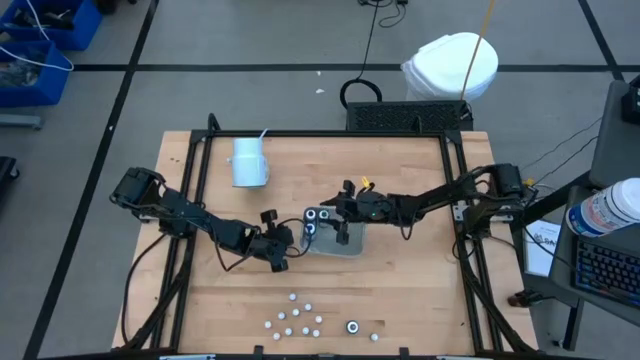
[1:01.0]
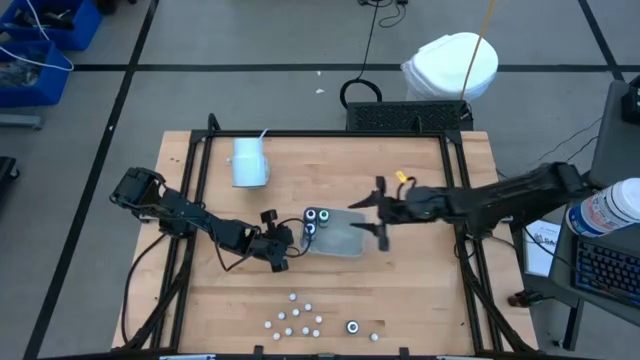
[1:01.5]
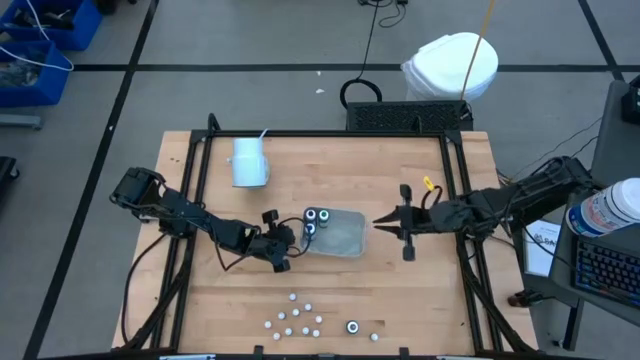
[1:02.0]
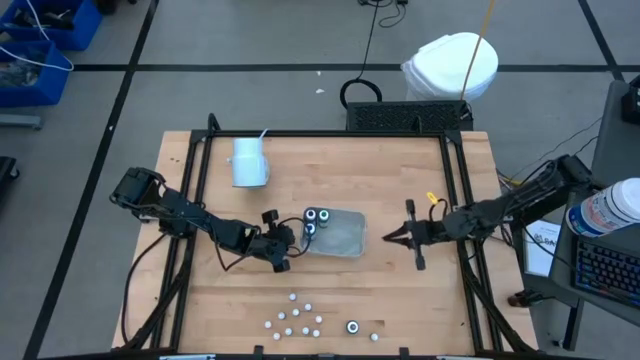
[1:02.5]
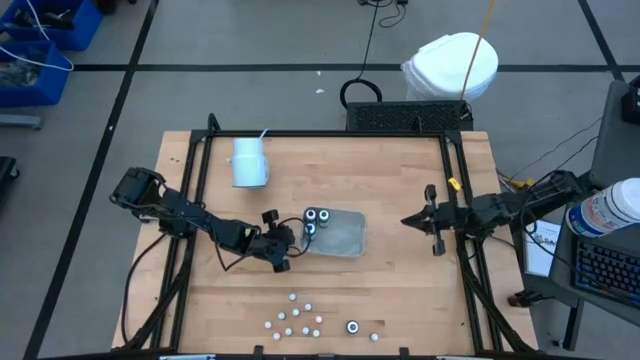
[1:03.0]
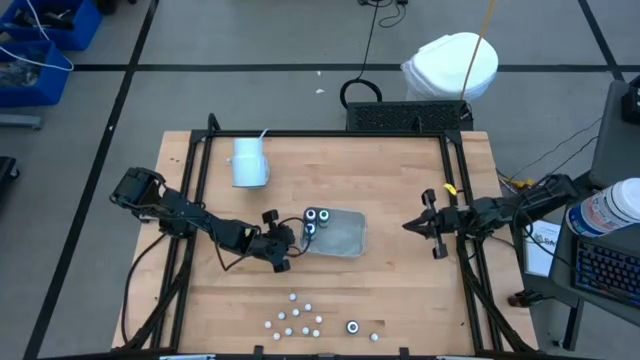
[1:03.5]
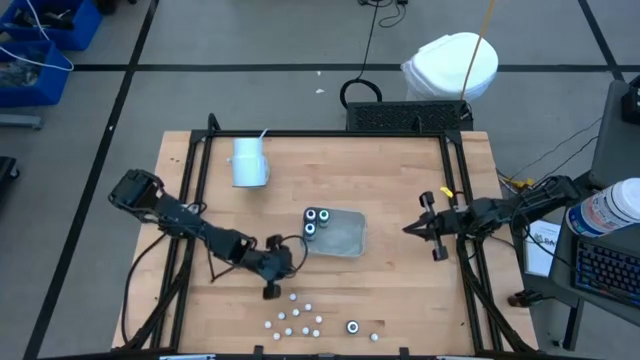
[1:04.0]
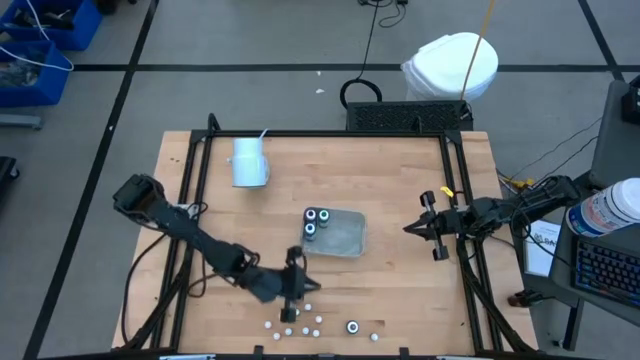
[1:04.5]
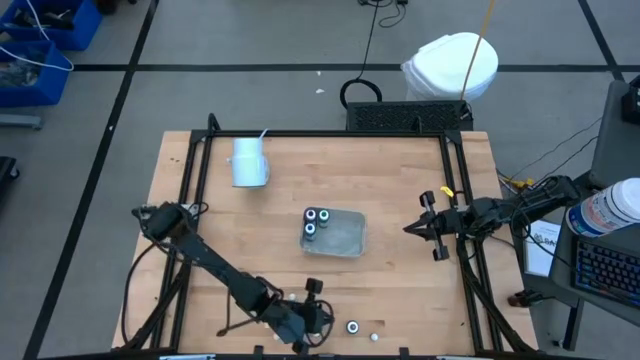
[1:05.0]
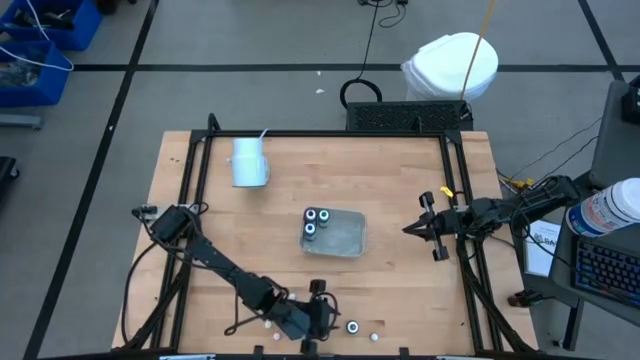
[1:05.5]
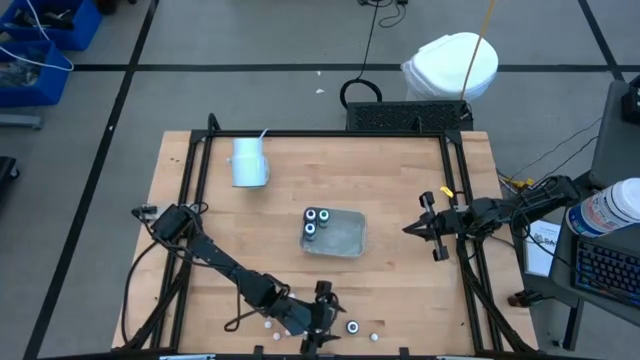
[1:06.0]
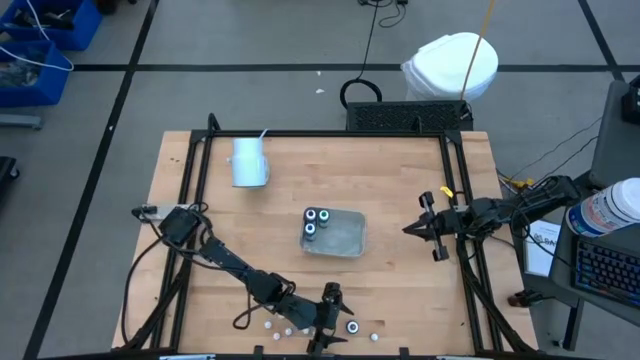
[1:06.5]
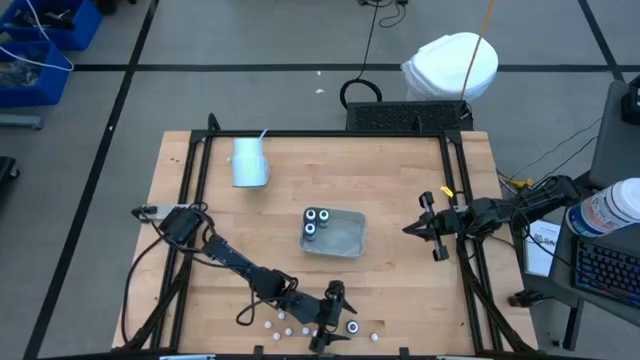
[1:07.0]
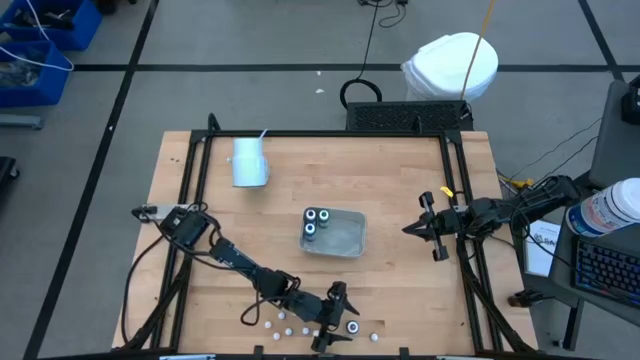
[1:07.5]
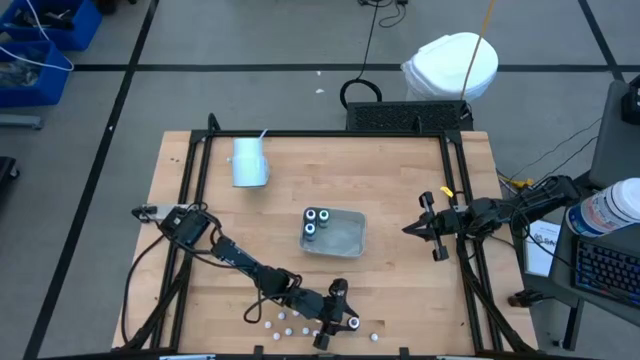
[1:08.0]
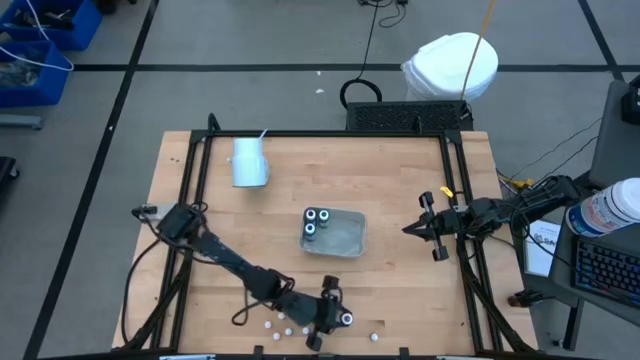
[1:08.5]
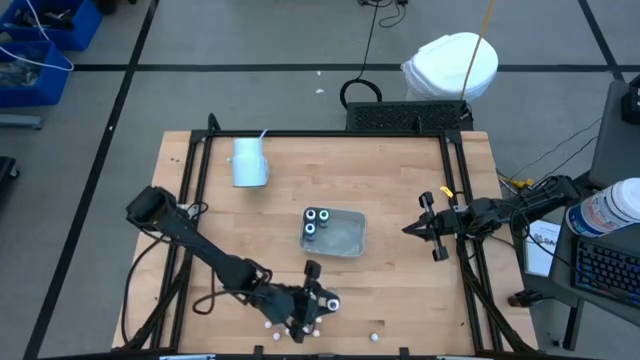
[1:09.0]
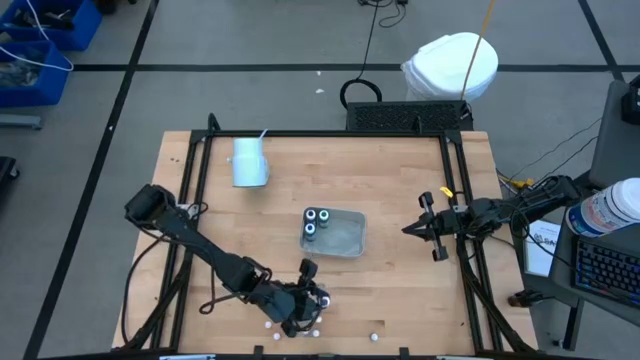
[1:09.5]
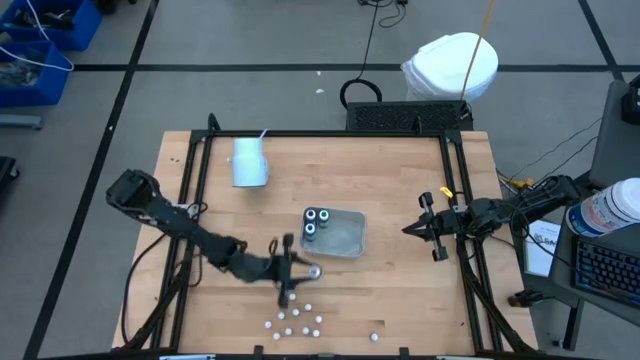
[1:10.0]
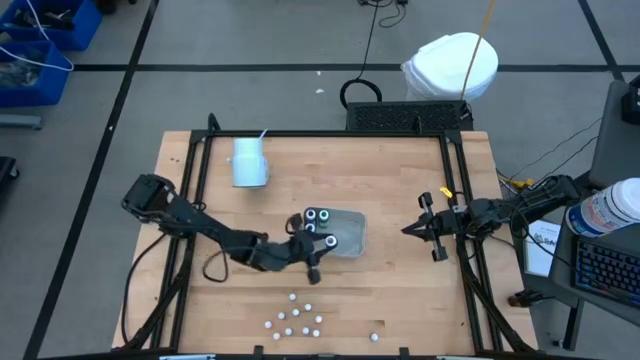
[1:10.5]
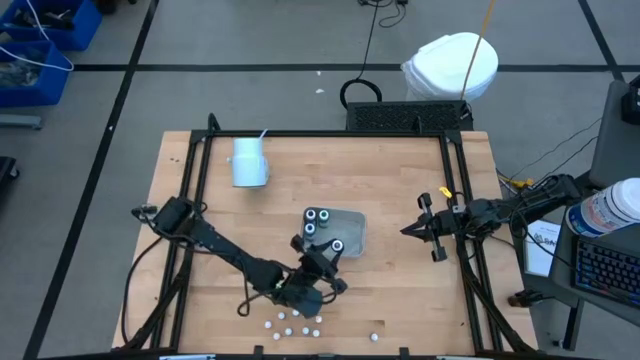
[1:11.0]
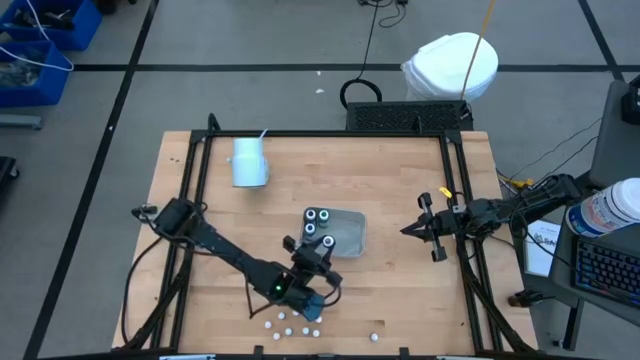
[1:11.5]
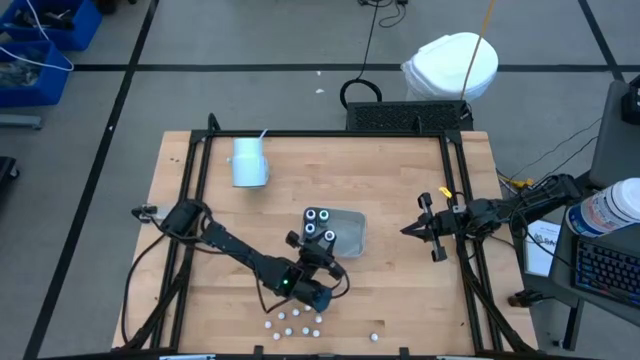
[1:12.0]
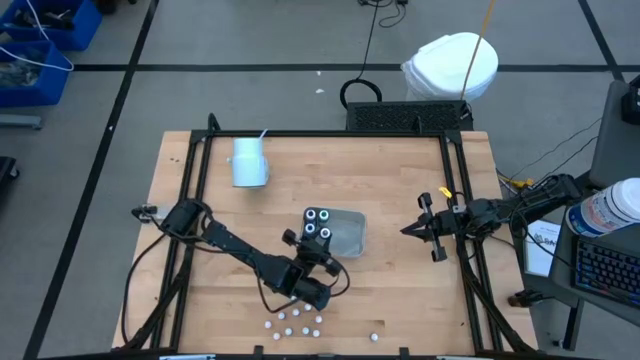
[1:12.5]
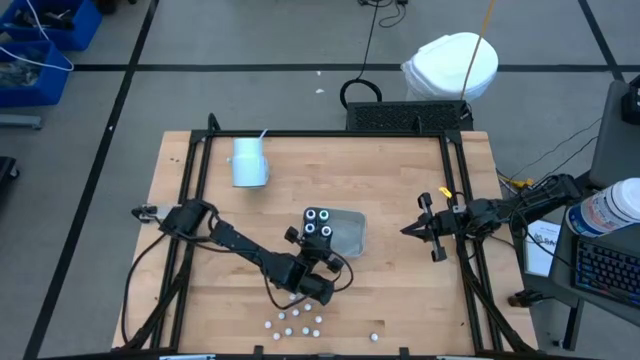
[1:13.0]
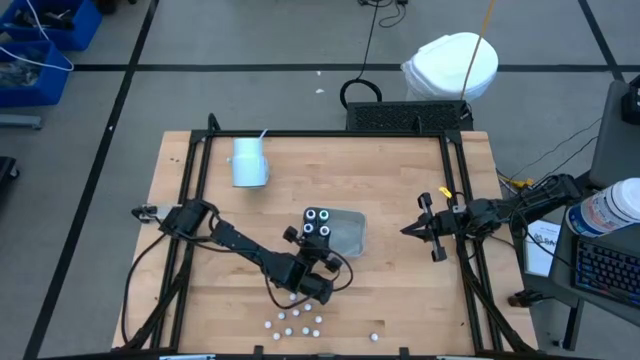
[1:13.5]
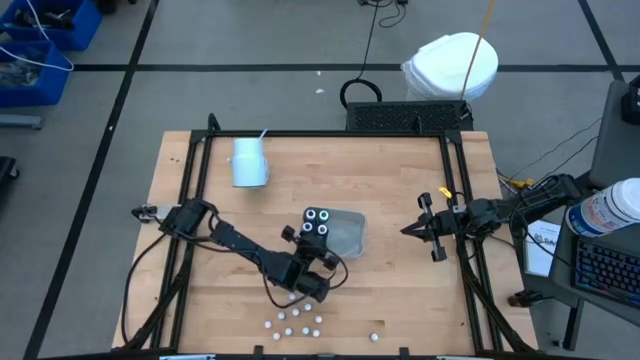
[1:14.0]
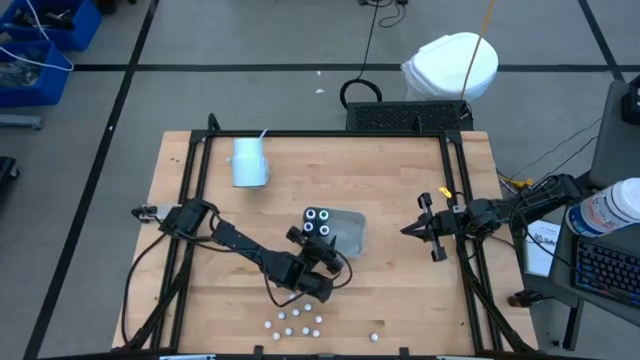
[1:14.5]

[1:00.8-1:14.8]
Task: Pick & Place food coloring
Put the large purple food coloring bottle into the white container

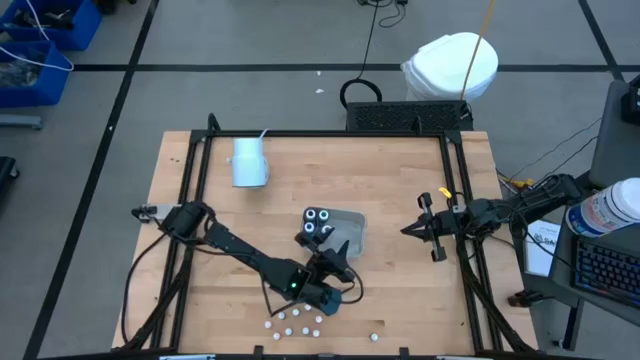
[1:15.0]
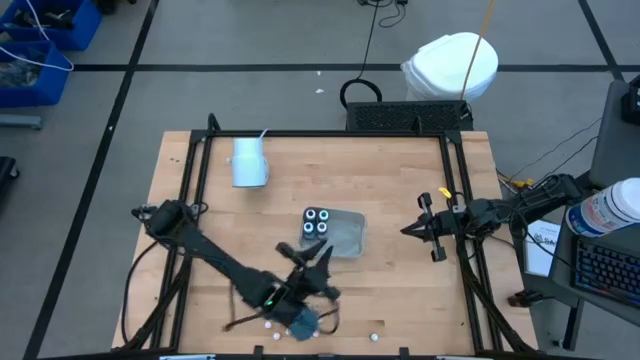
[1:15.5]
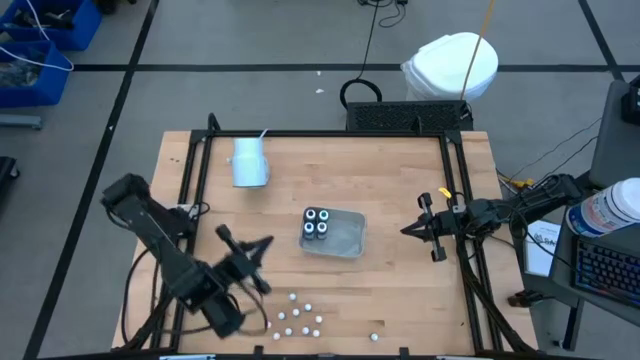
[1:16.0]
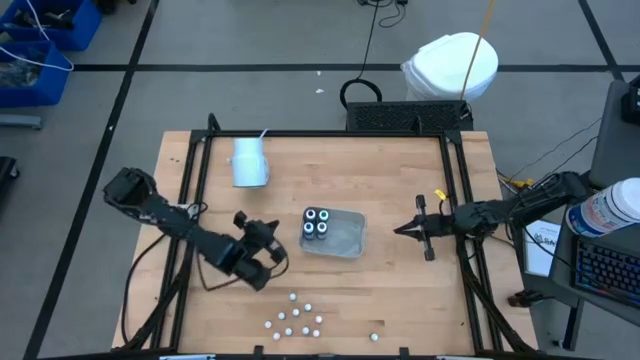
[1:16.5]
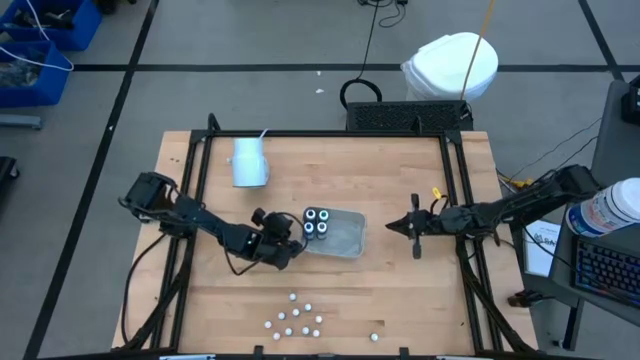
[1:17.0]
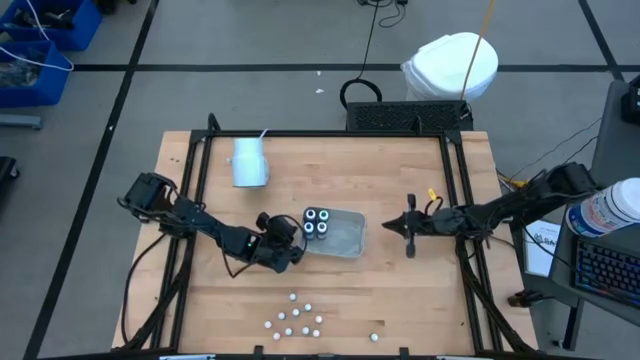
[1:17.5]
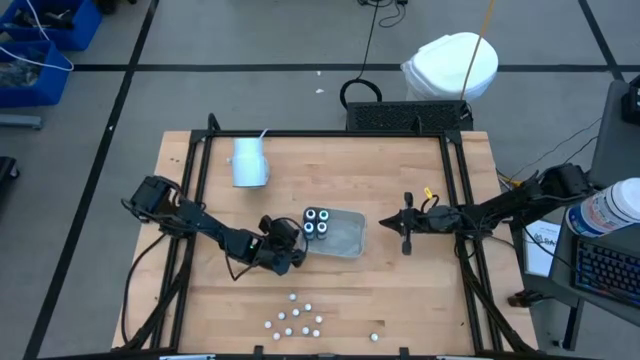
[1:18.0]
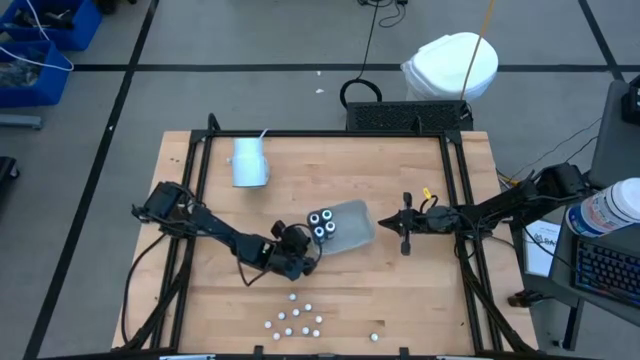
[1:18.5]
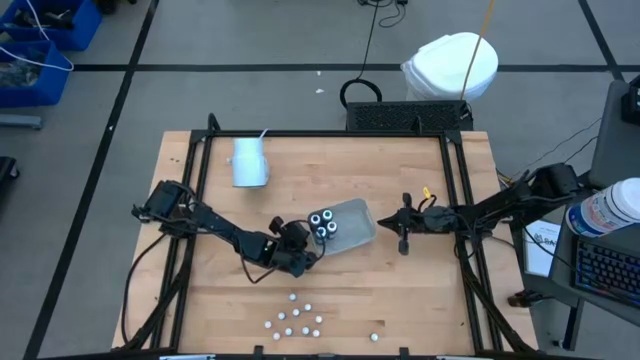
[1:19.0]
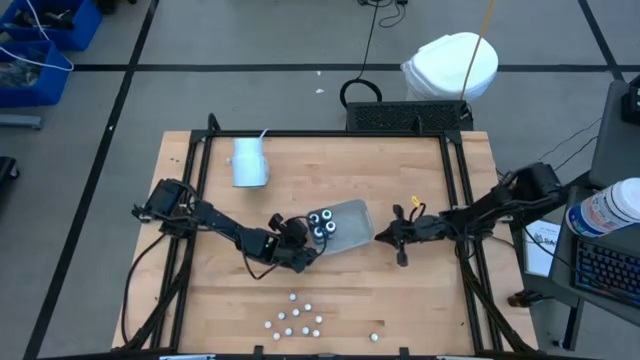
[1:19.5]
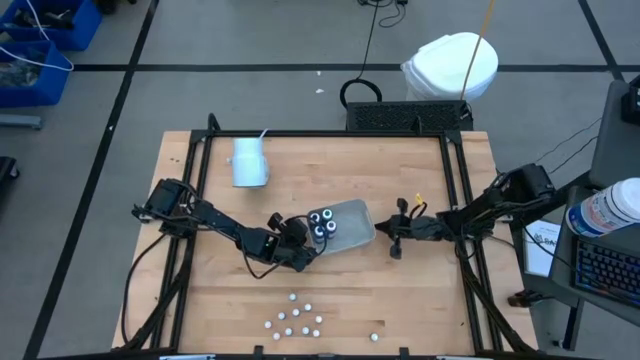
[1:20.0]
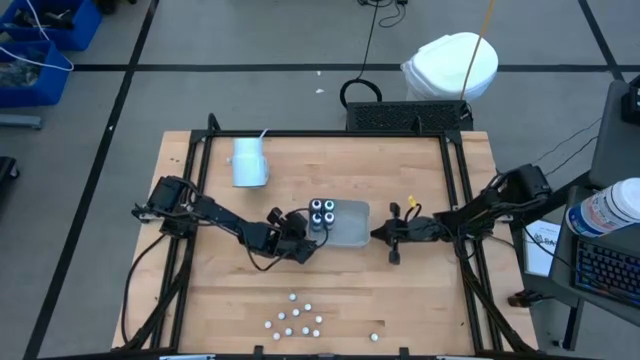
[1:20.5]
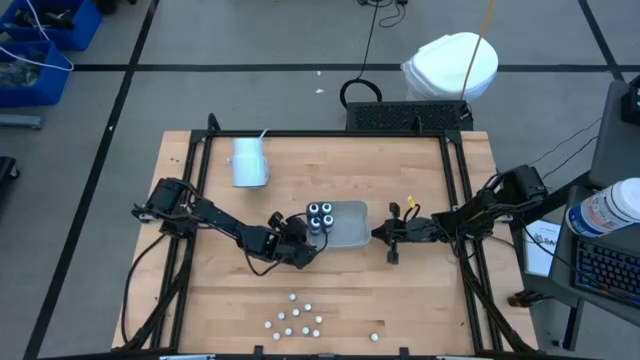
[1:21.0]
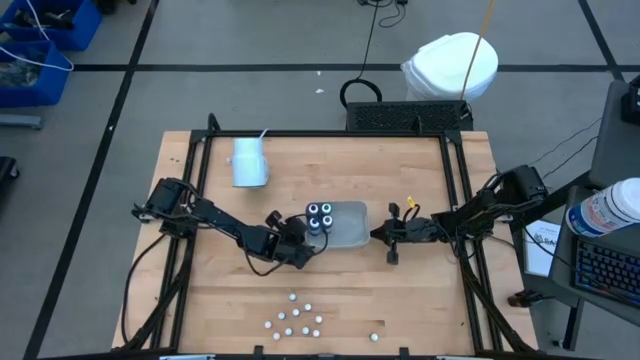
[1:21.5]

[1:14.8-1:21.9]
Adjust the white container
